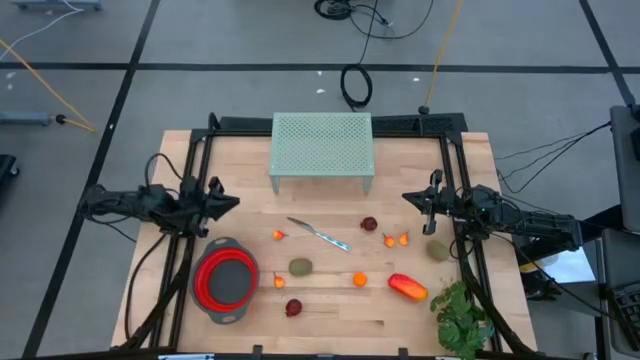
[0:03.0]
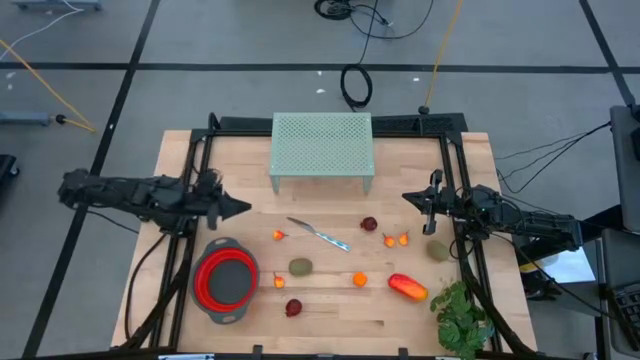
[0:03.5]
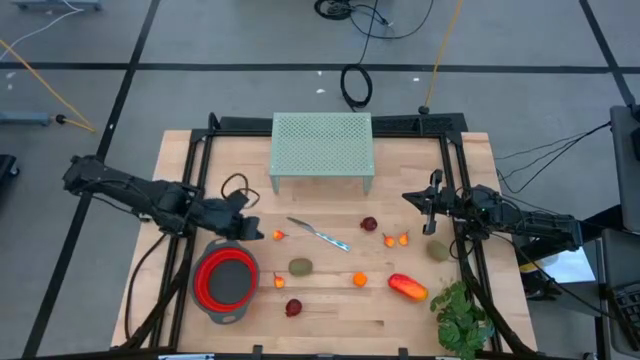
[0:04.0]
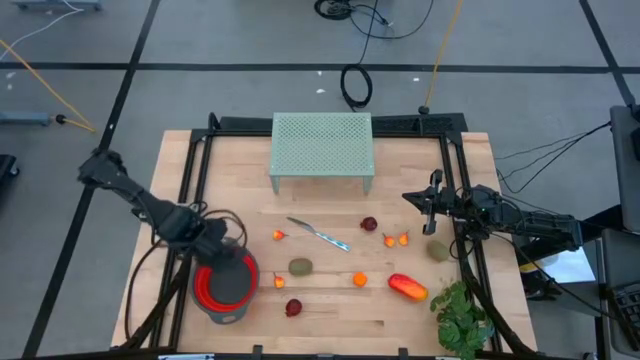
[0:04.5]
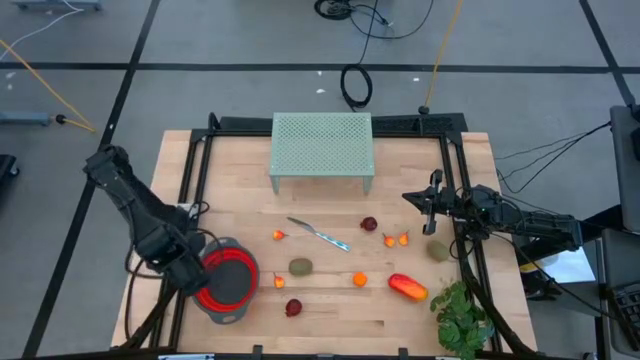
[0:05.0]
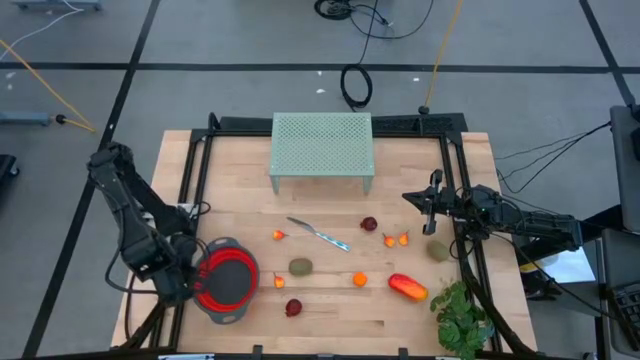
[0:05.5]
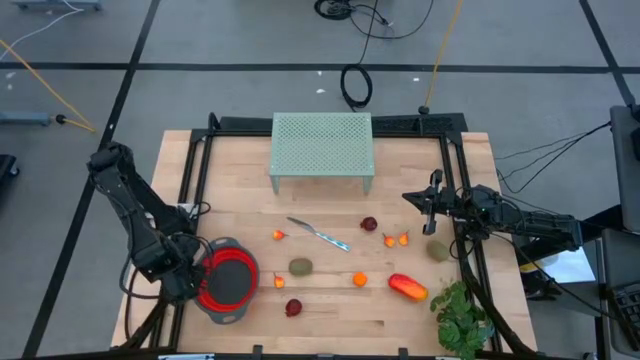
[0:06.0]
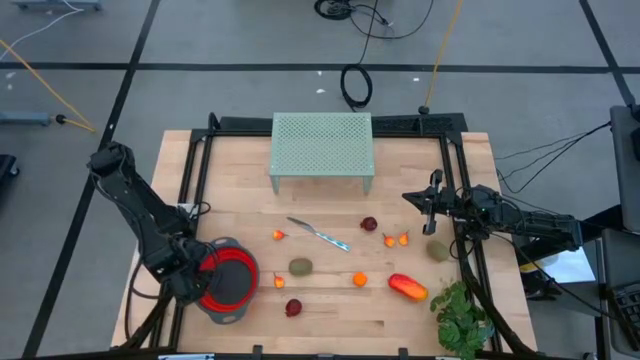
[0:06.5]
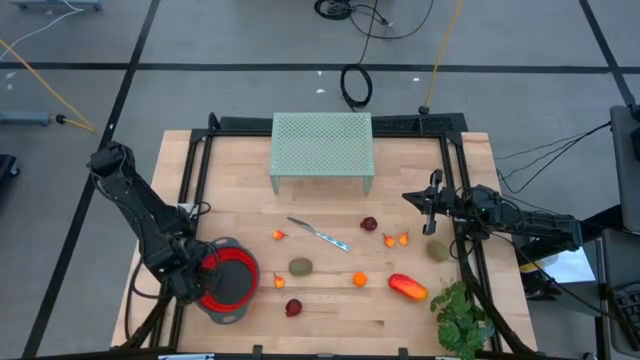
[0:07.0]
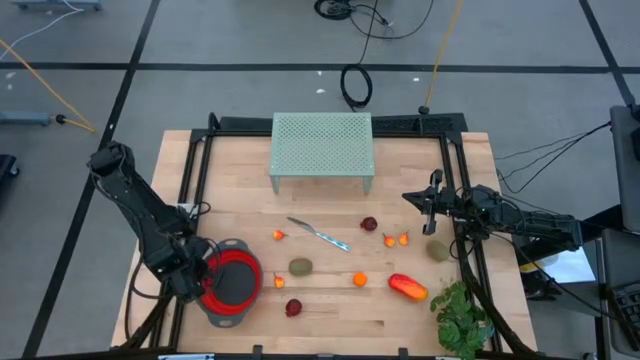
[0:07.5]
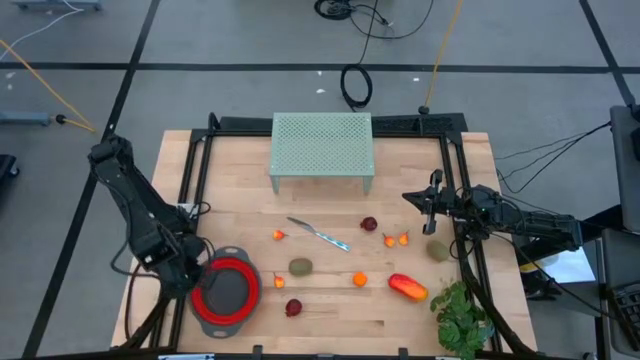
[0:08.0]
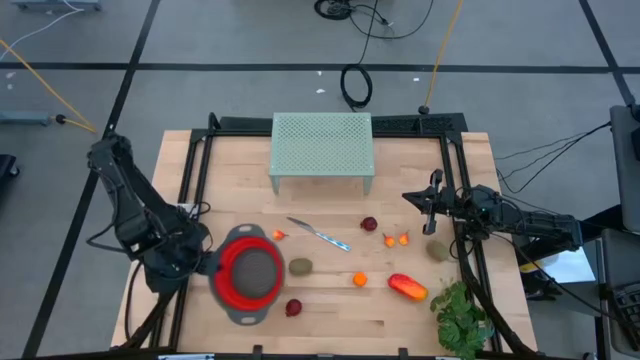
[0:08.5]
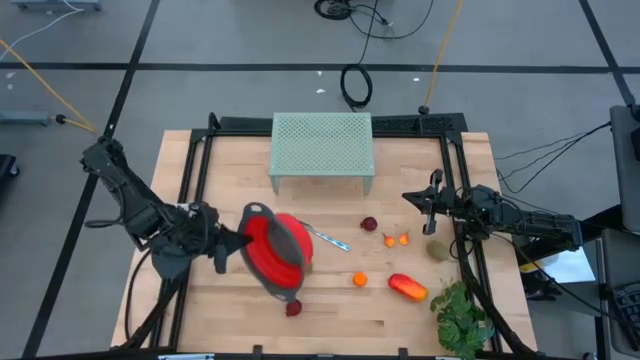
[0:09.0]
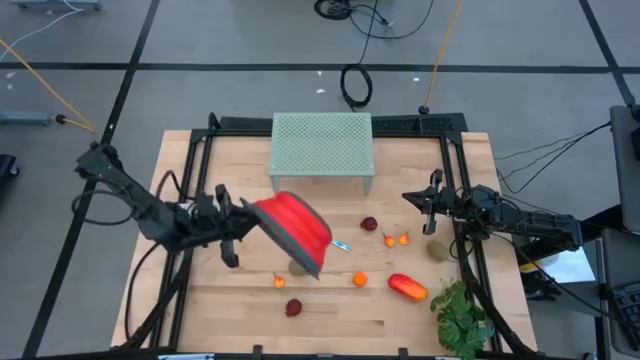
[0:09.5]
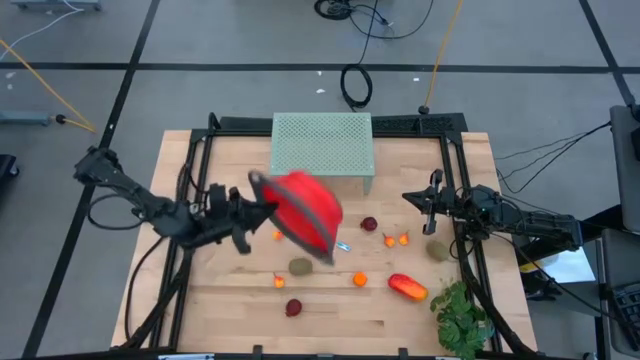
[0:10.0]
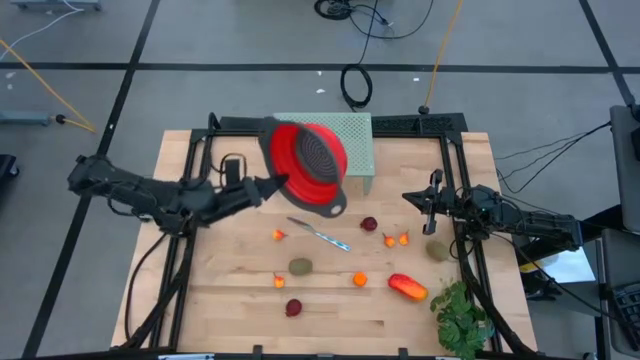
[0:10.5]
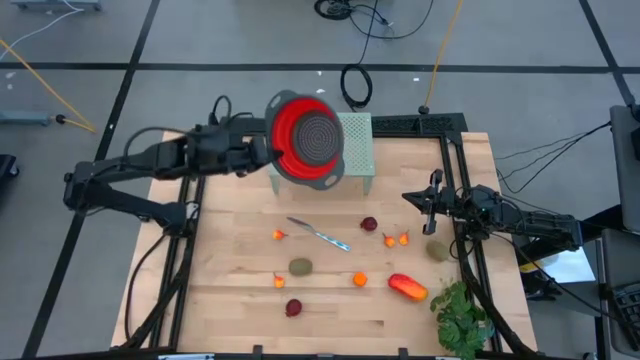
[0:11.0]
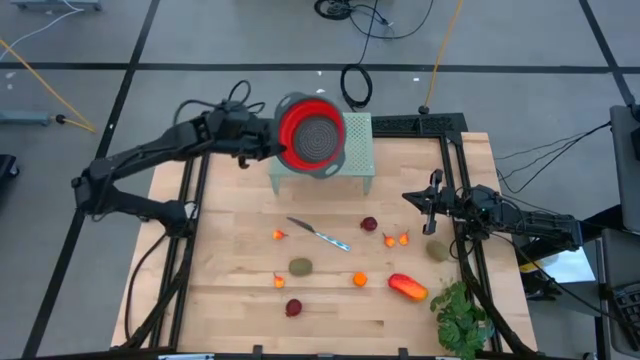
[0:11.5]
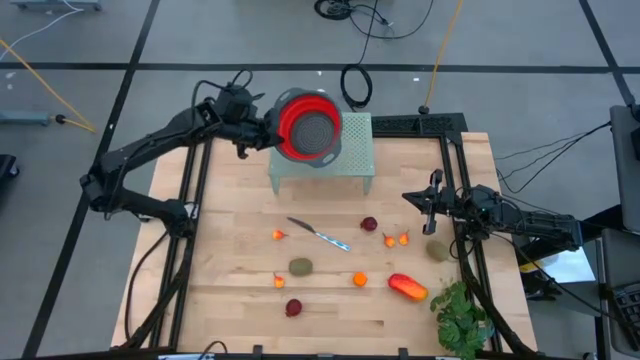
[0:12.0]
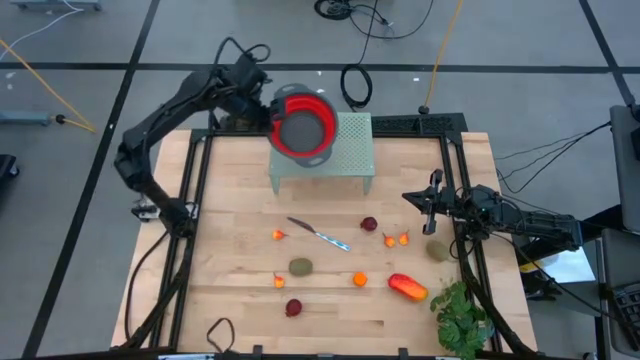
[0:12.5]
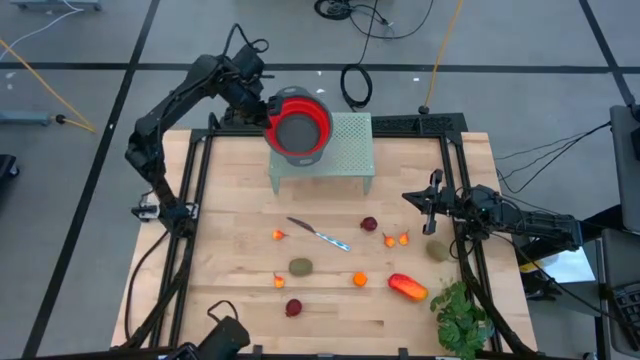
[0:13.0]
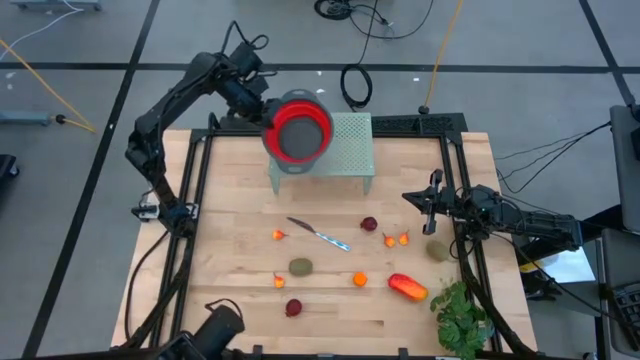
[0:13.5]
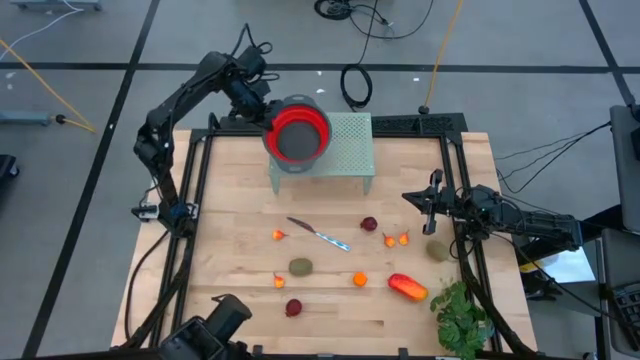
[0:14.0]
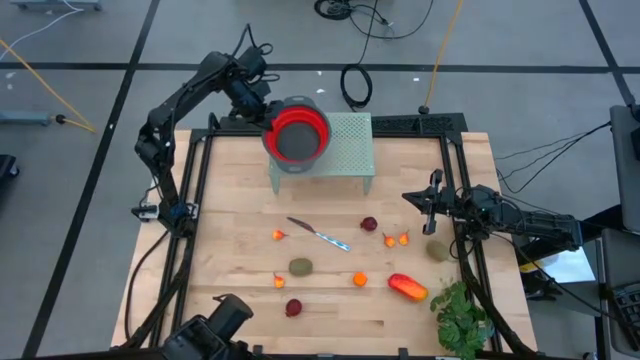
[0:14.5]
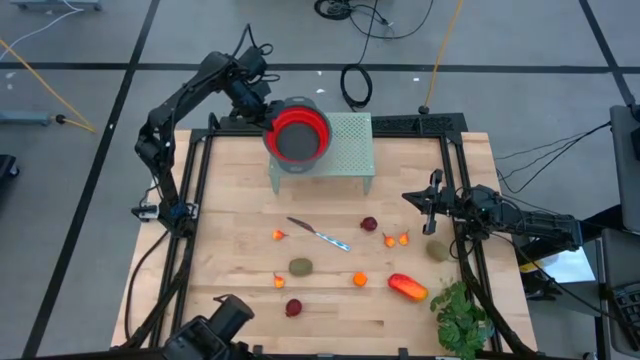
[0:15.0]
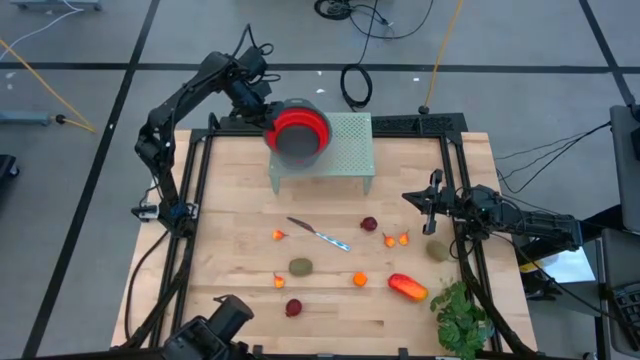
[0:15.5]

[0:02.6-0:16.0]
Task: Pick & Place Fruit
Put the red strainer bowl on the shelf

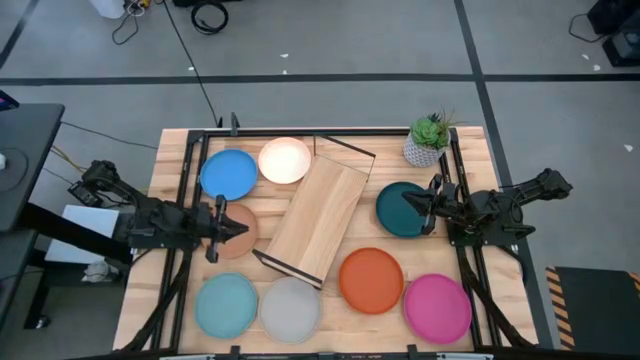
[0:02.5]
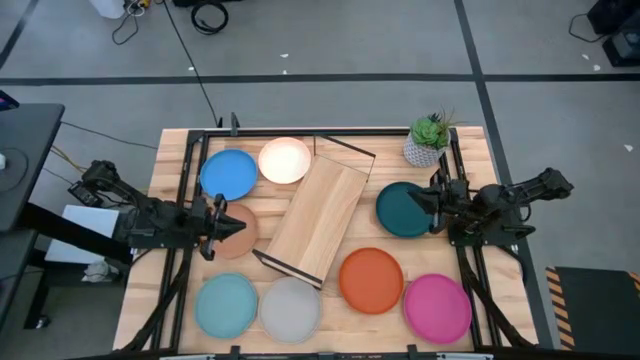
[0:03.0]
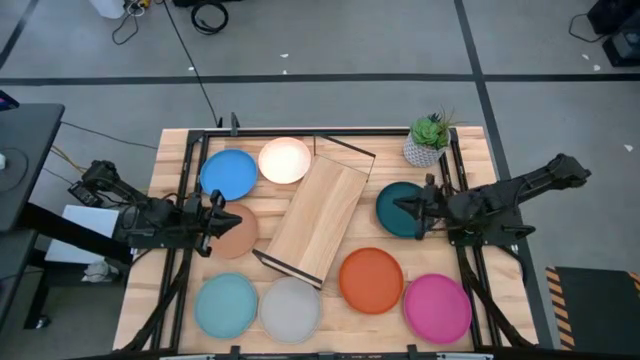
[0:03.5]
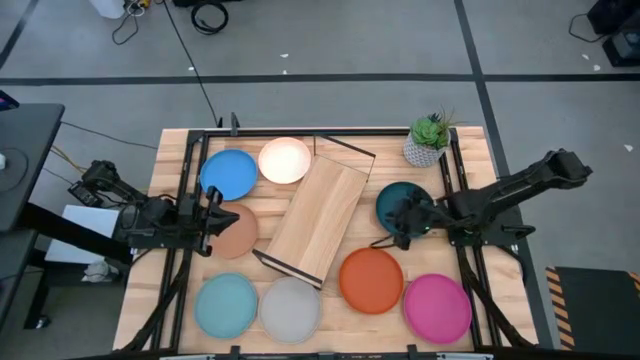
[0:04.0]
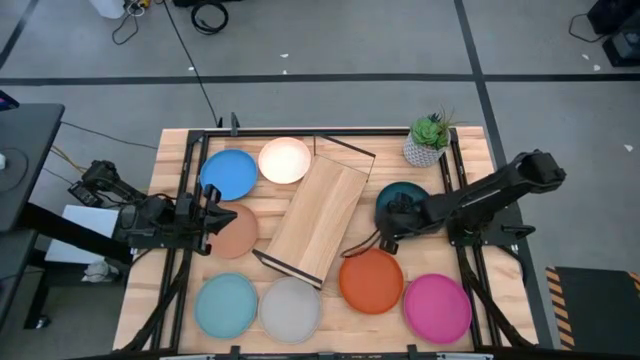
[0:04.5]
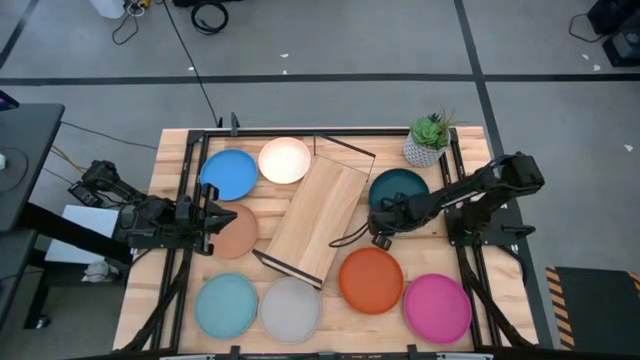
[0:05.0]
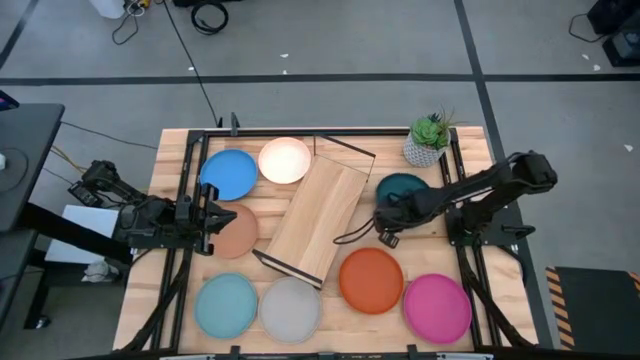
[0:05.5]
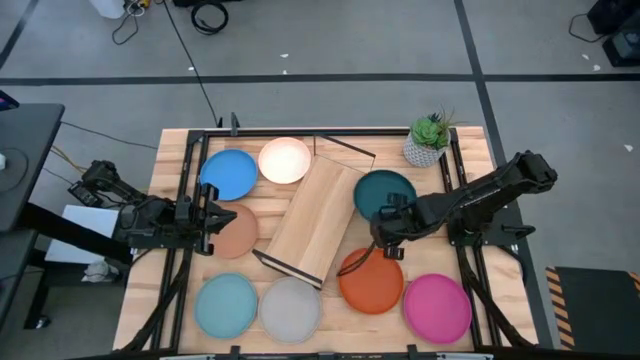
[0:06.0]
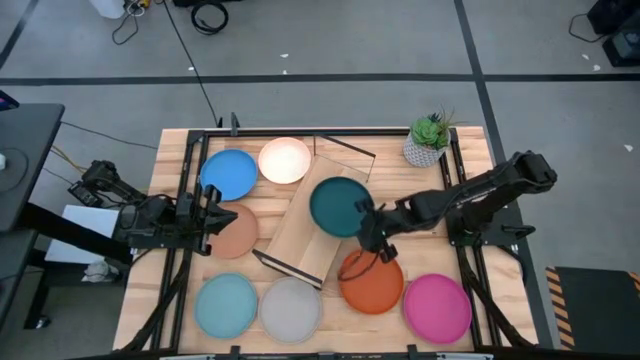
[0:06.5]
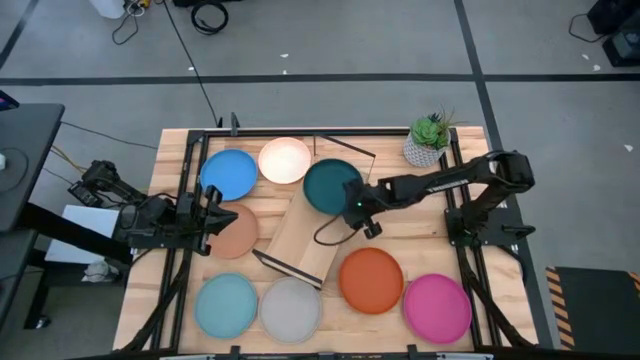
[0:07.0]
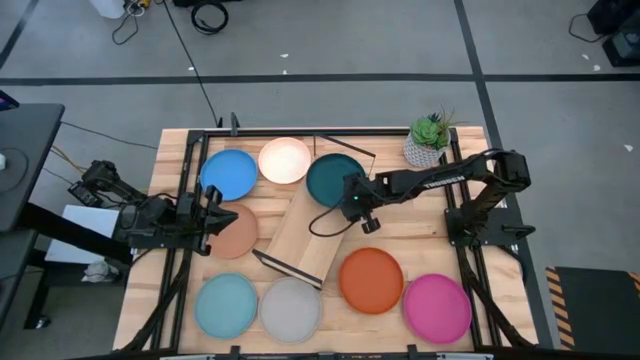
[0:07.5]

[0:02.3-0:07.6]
Task: Place and stack plates onto a shelf
Put the dark green plate on the shelf

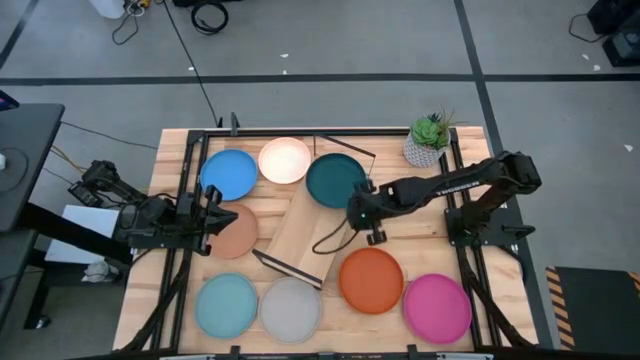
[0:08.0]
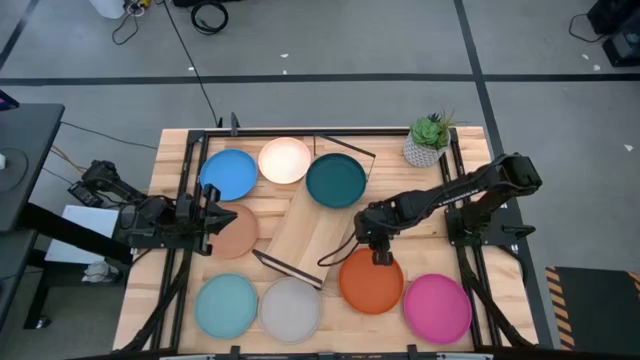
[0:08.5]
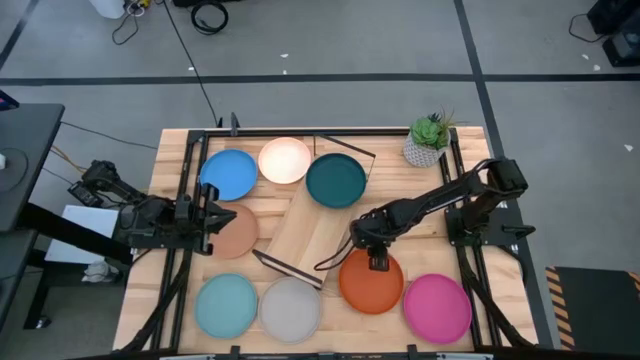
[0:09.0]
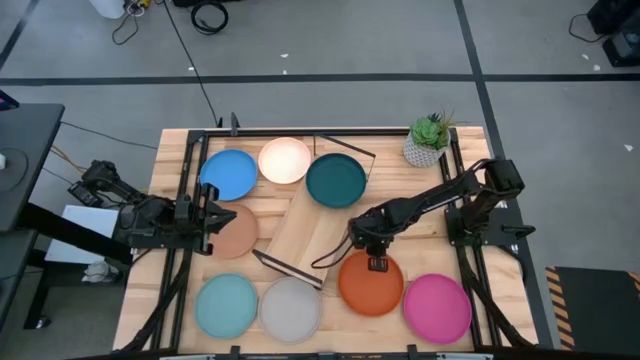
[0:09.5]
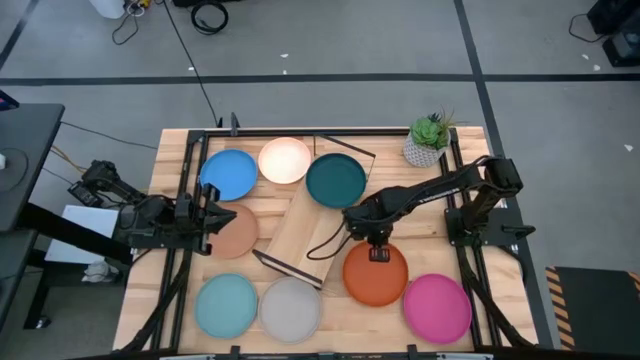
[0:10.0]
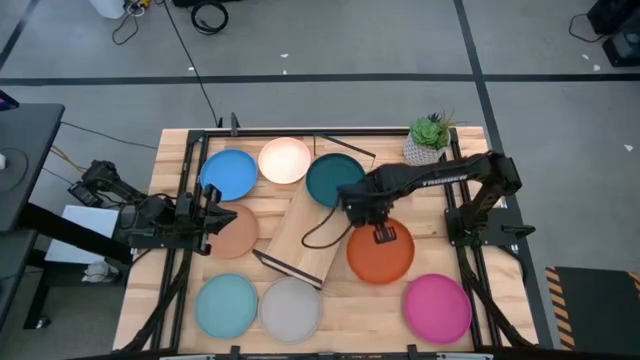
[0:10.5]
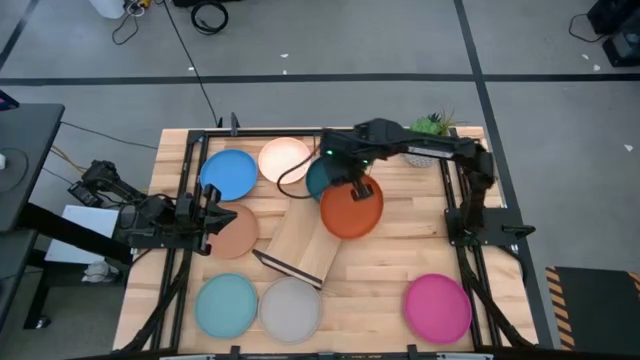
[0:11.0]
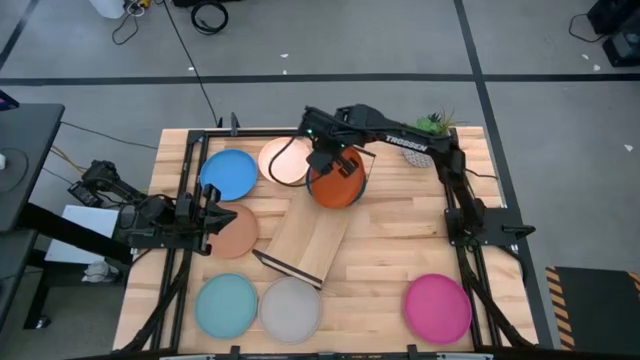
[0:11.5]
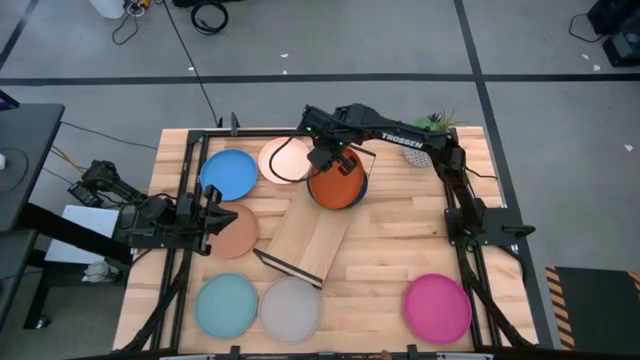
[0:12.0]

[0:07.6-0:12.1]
Stack the orange plate on top of the dark green plate on the shelf
